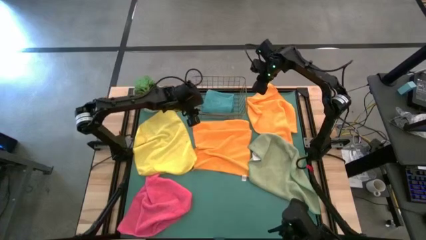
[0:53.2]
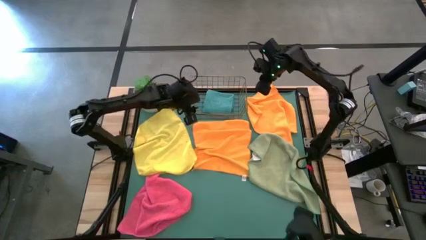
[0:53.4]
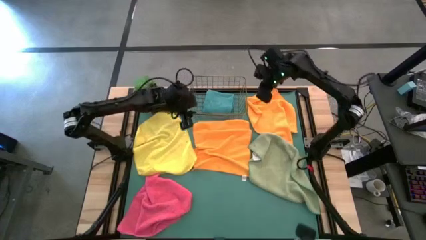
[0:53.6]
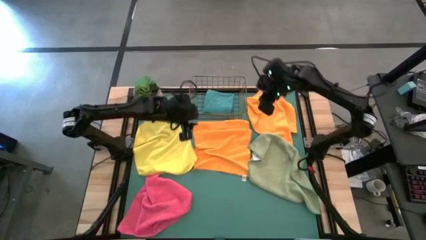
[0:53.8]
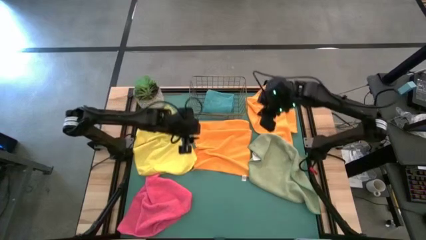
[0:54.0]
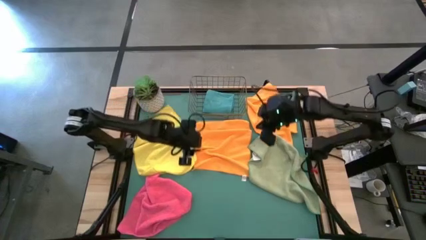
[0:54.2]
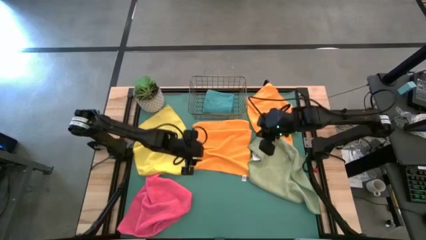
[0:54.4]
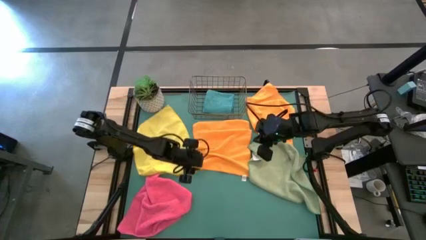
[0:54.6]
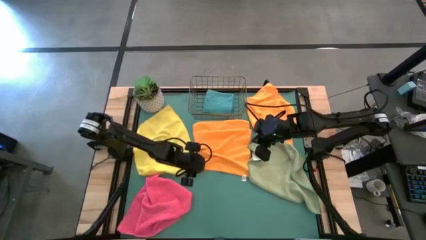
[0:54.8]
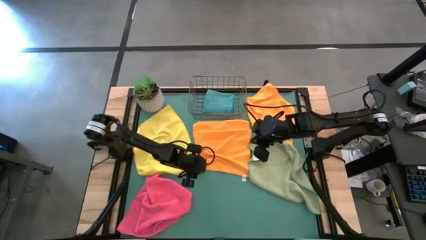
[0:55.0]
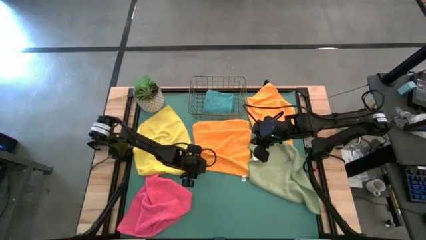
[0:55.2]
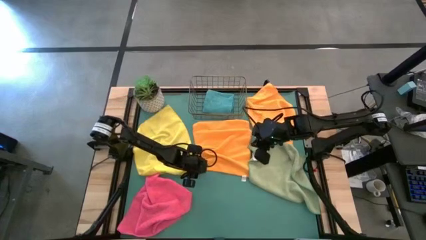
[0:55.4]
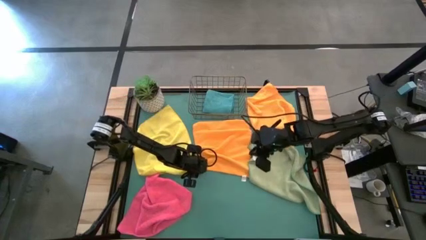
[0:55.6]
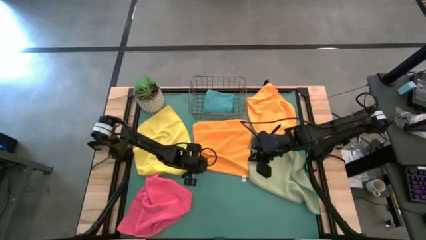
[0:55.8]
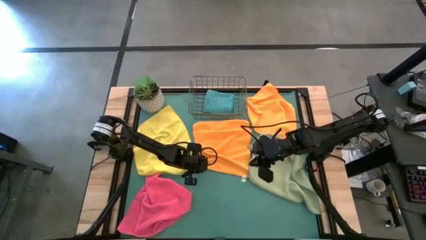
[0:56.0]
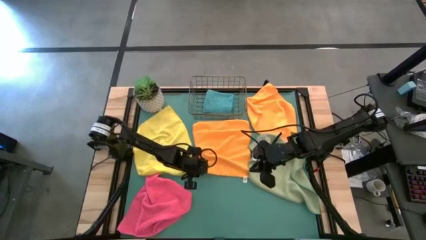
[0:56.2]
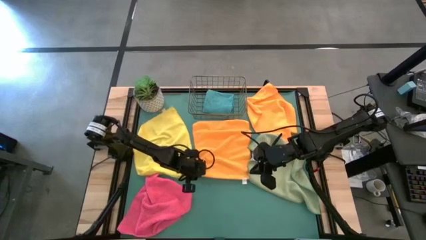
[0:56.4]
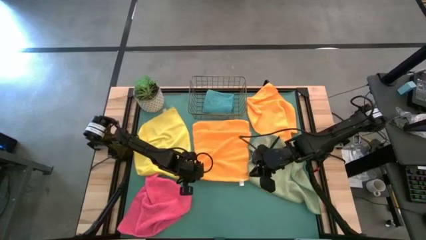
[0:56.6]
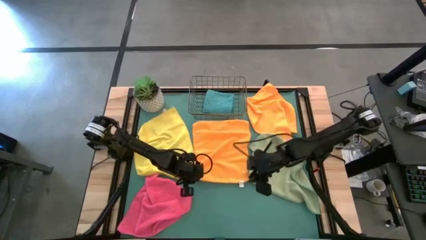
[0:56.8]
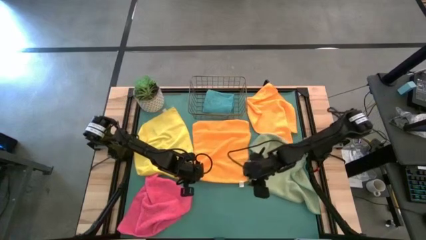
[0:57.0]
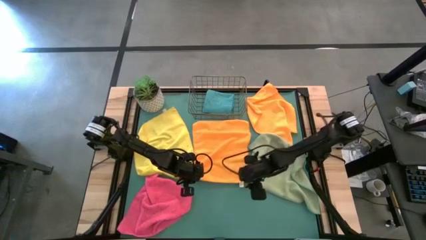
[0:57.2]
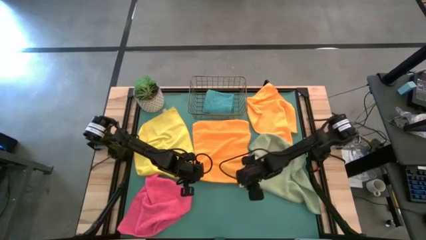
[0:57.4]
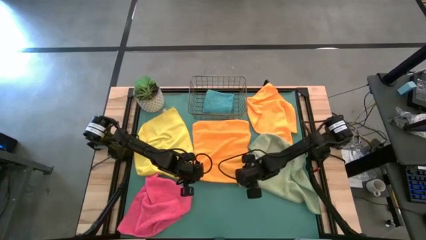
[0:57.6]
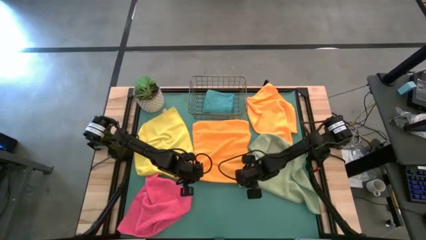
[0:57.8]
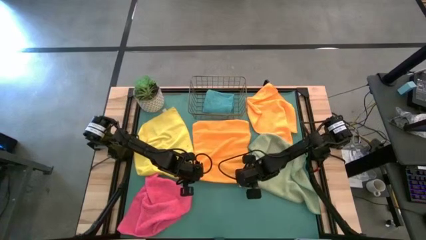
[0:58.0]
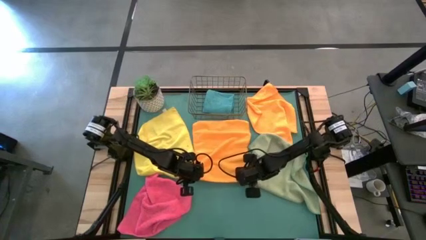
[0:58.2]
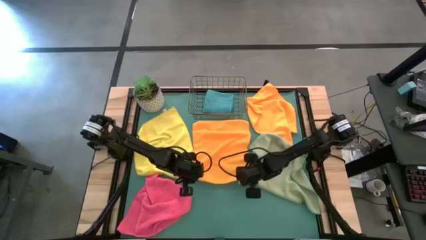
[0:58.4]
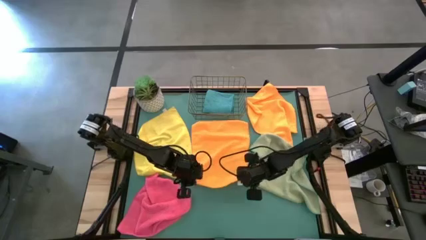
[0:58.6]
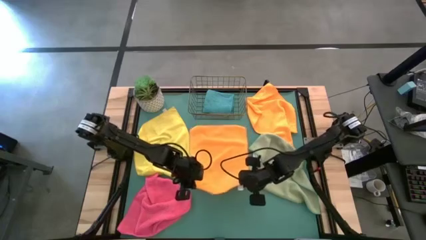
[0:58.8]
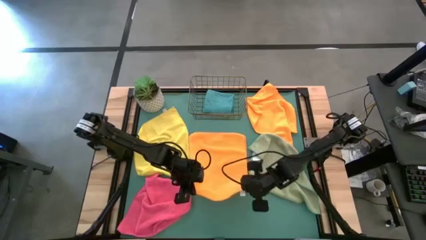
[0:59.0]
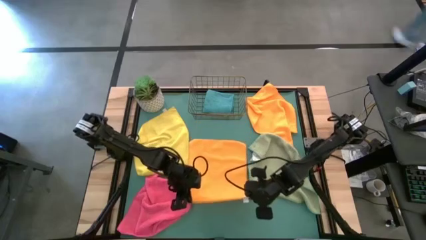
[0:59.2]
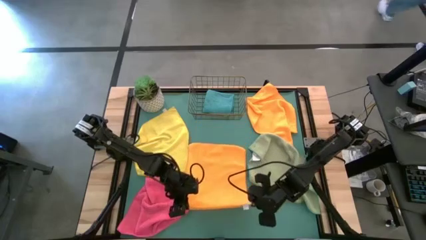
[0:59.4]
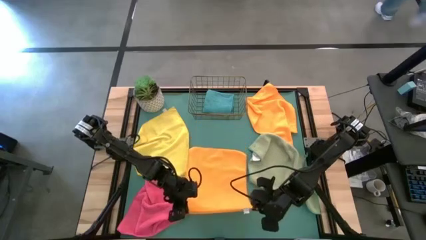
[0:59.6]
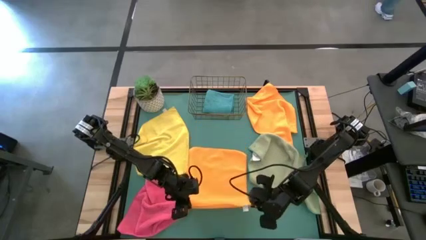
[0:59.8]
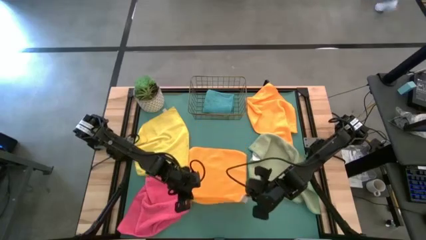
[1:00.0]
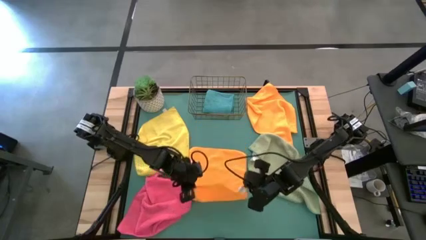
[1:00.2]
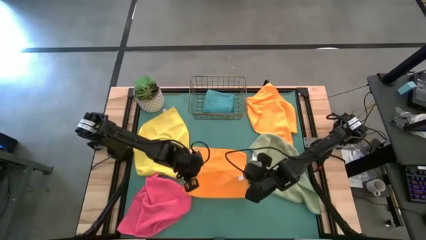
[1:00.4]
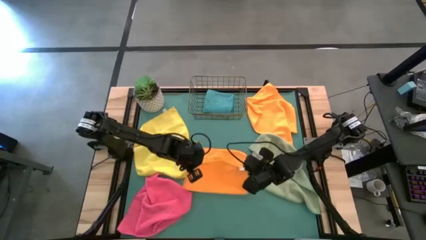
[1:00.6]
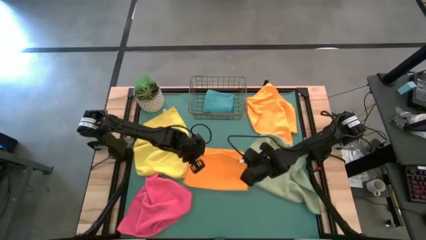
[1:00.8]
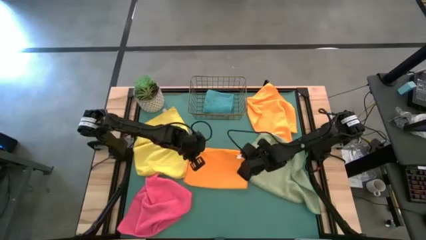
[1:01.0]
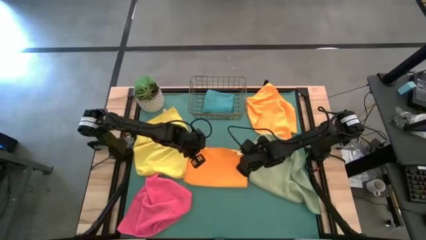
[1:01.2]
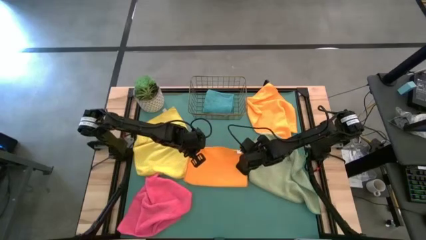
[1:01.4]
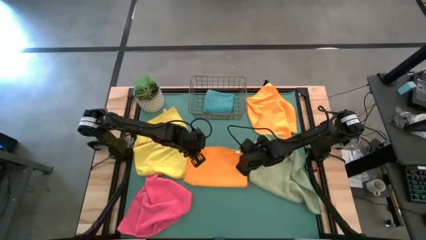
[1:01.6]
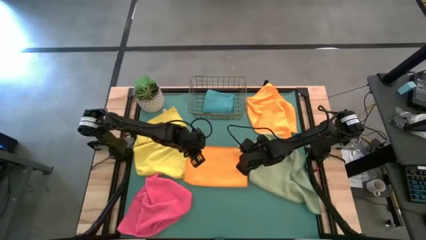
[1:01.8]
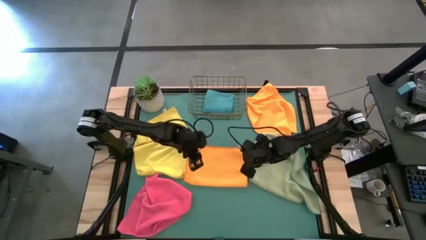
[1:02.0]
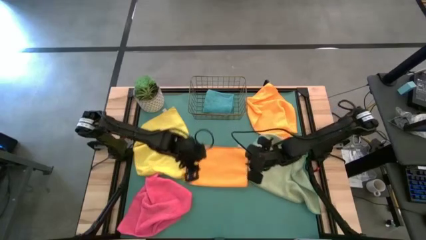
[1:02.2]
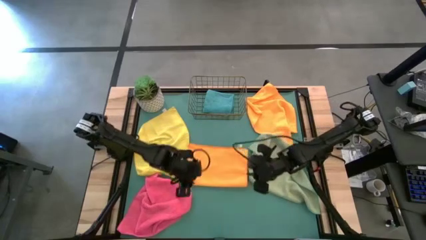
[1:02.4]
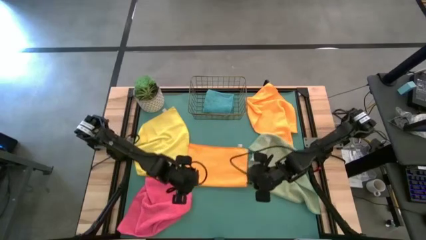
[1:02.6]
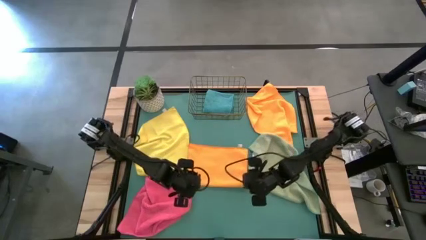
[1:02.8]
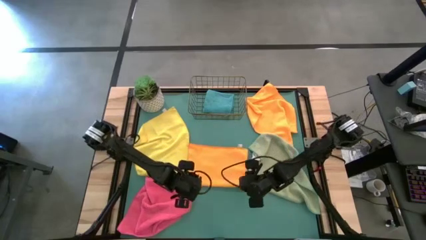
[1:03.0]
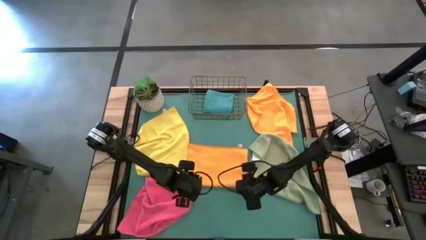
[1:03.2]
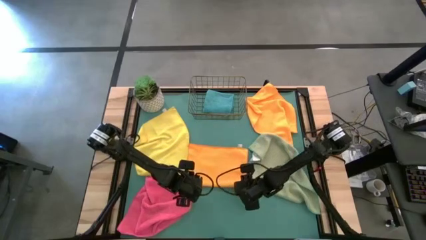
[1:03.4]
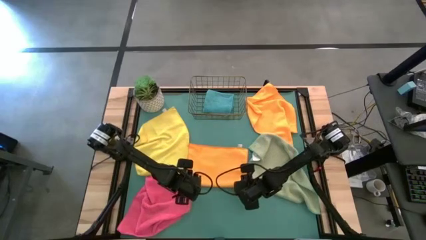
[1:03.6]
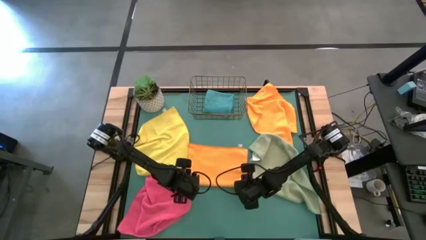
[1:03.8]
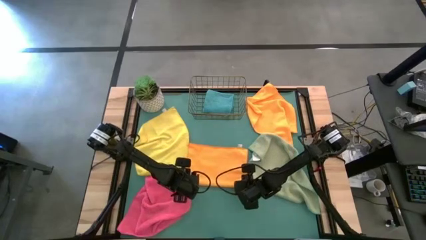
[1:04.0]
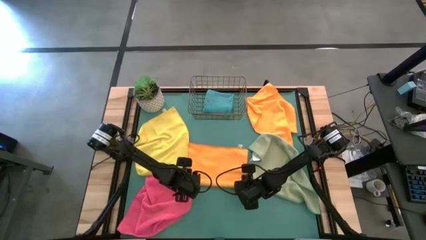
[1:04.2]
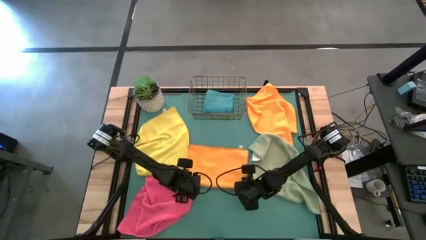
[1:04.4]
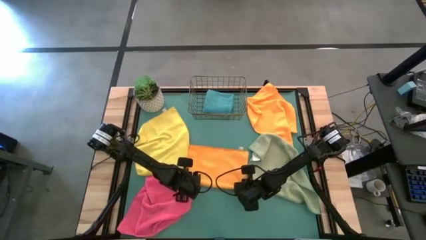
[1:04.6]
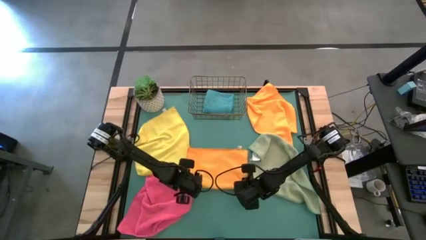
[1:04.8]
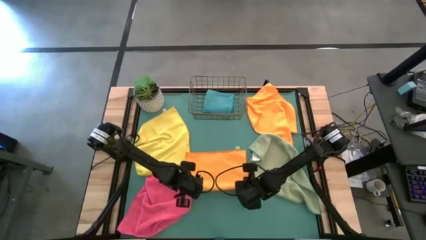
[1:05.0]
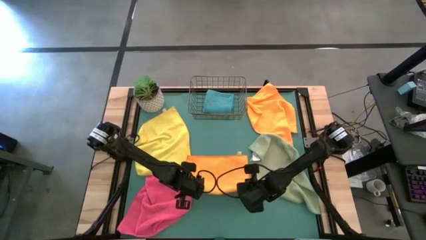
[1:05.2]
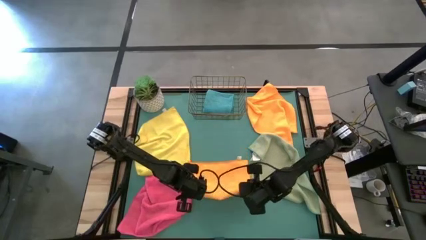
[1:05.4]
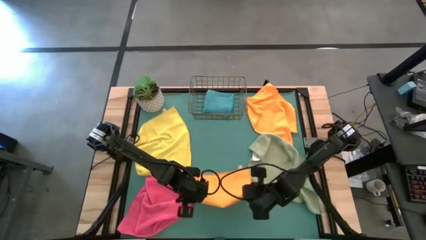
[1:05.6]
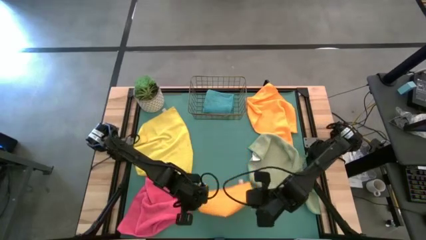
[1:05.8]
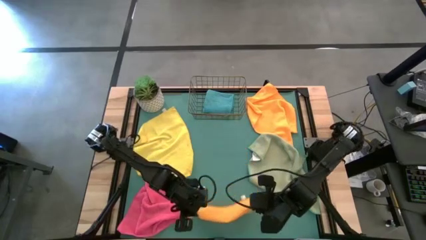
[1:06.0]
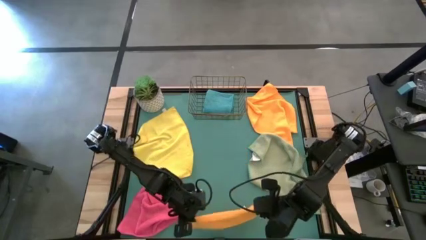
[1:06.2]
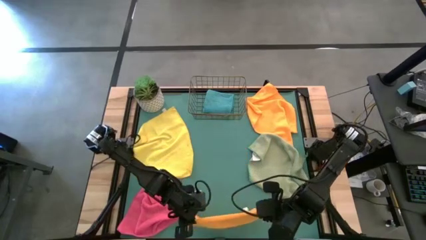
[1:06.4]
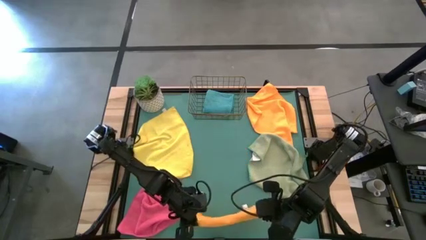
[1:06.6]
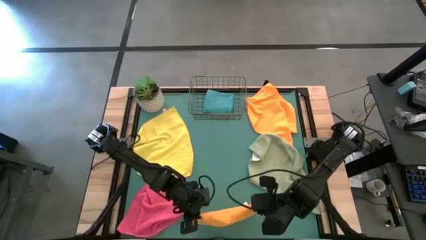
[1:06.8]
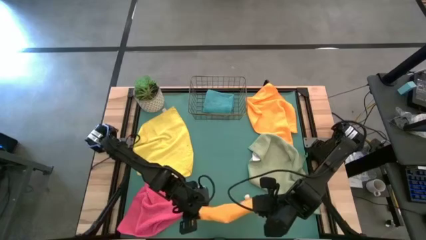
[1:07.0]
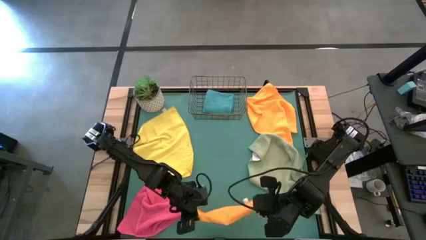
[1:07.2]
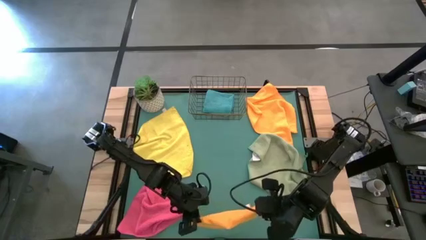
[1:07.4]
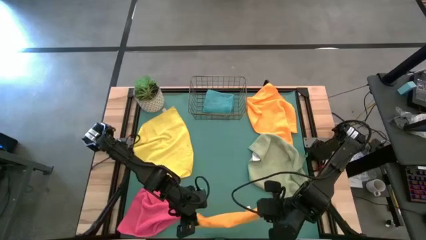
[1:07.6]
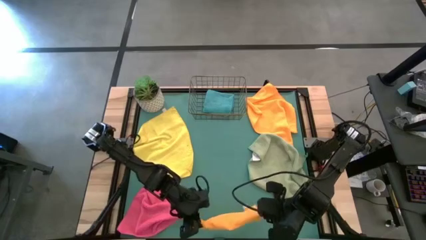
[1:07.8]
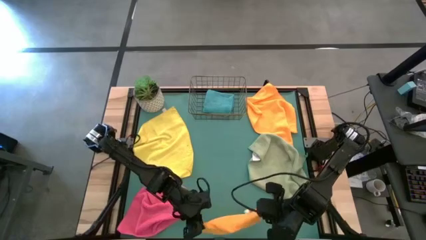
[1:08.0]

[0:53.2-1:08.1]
Task: Fold microfiber towels
Fold the left orange microfiber cloth

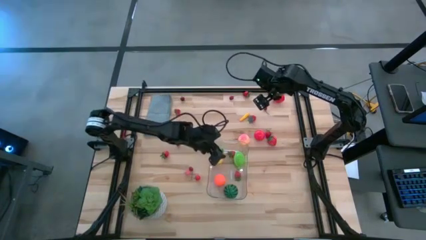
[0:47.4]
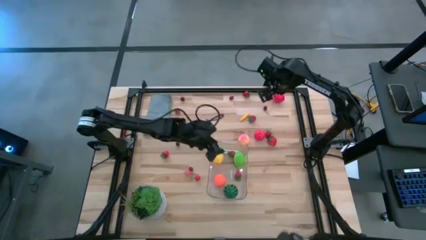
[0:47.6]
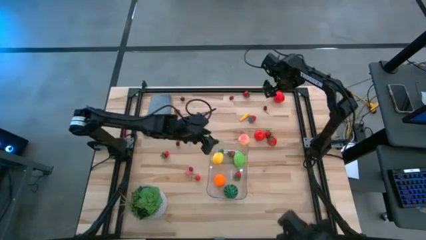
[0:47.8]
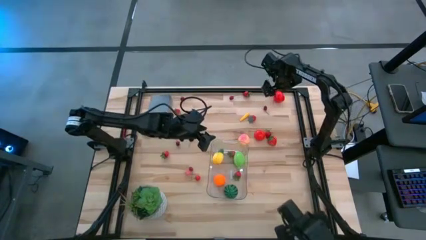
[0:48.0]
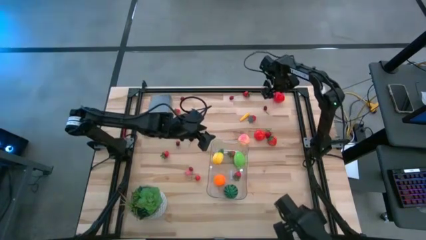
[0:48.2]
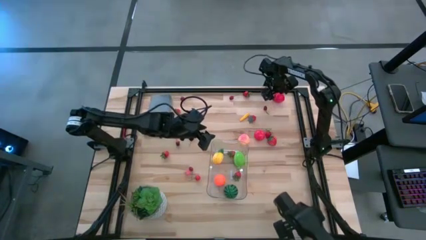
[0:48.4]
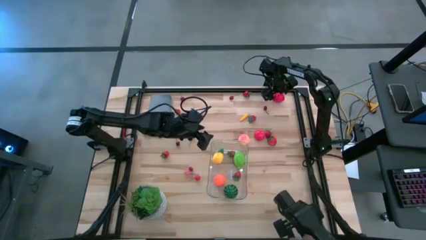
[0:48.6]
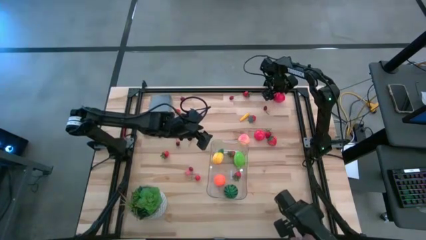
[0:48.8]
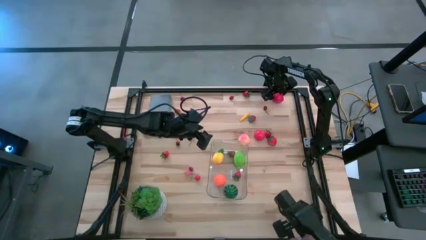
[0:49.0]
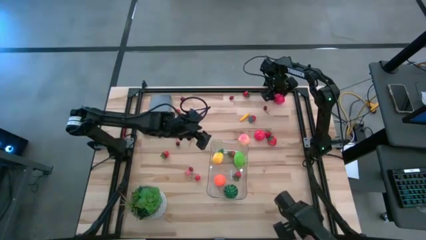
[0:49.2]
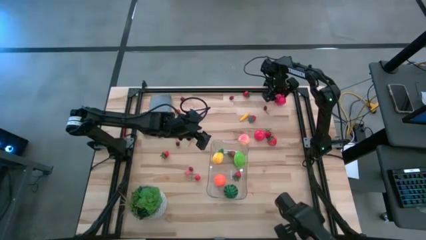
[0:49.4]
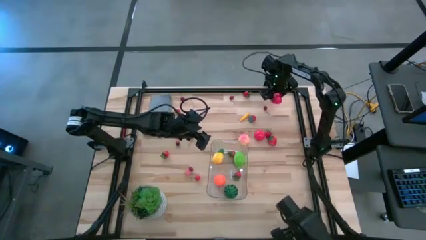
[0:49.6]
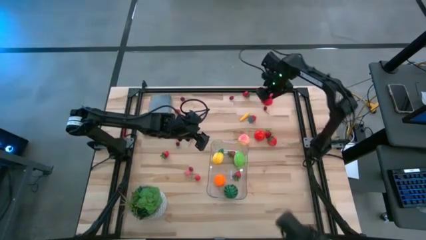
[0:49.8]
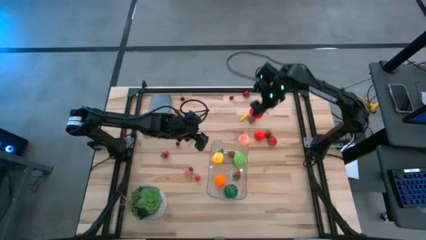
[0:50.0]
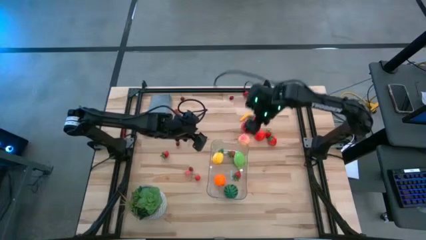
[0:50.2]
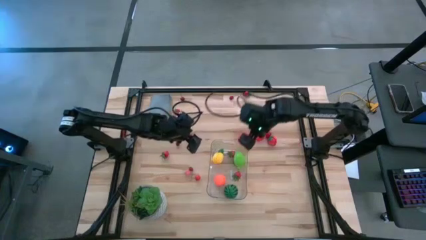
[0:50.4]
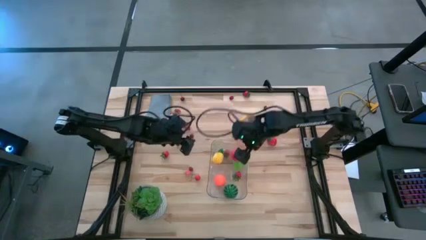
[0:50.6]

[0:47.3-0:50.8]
Task: Pick and placing Produce into tupperware
Put the top tomato into the transparent bin
